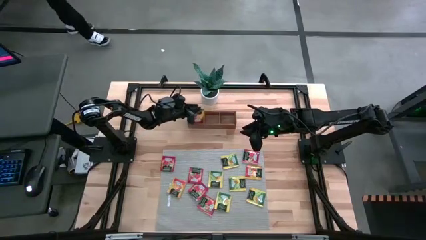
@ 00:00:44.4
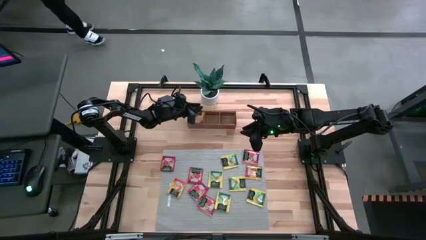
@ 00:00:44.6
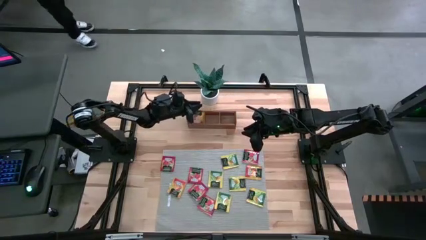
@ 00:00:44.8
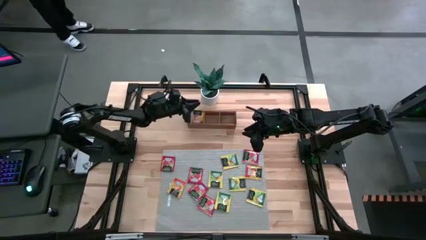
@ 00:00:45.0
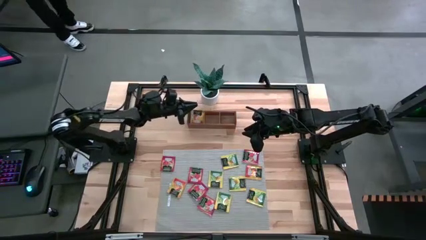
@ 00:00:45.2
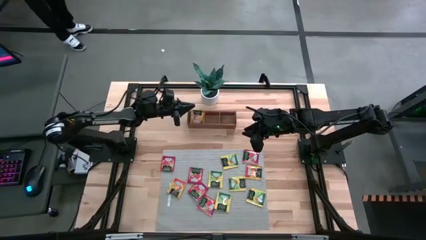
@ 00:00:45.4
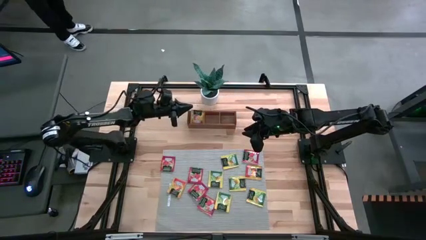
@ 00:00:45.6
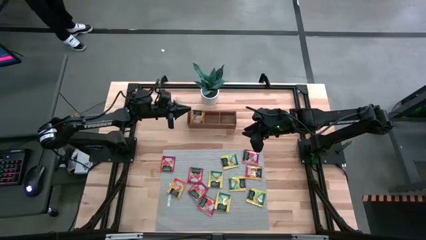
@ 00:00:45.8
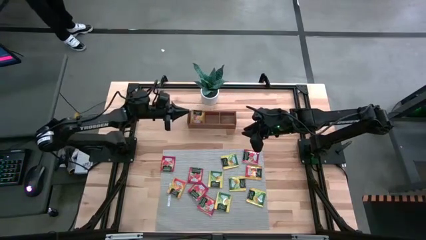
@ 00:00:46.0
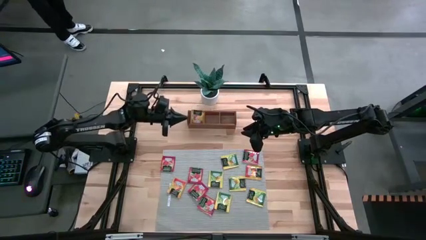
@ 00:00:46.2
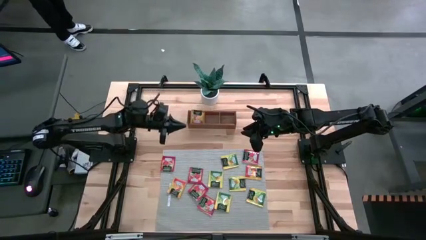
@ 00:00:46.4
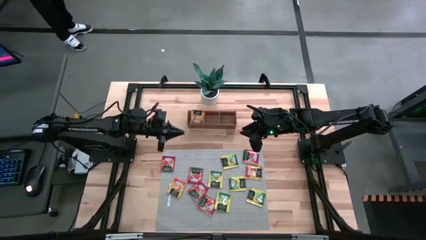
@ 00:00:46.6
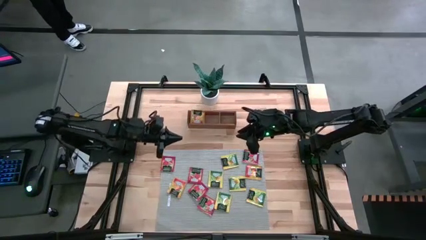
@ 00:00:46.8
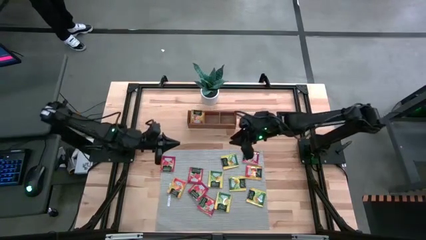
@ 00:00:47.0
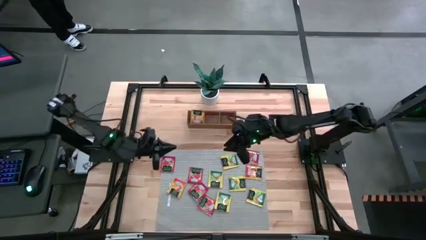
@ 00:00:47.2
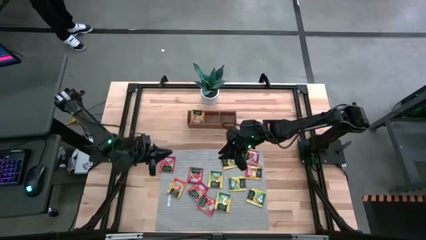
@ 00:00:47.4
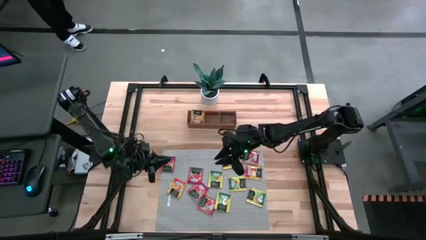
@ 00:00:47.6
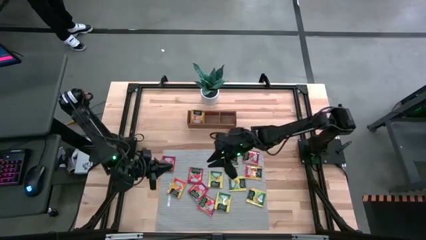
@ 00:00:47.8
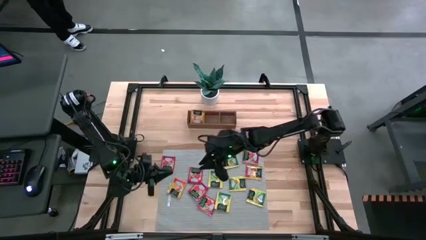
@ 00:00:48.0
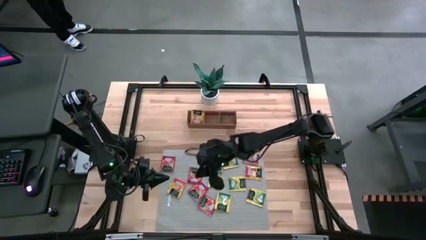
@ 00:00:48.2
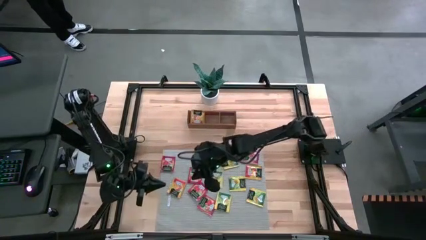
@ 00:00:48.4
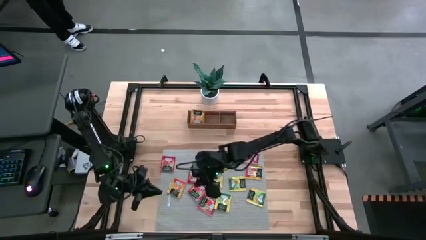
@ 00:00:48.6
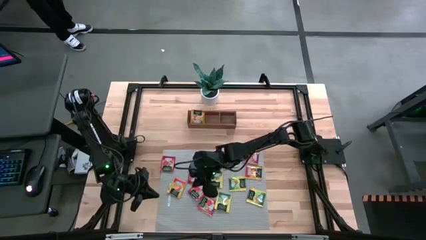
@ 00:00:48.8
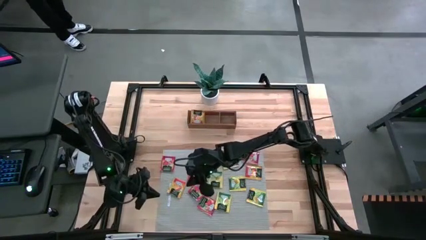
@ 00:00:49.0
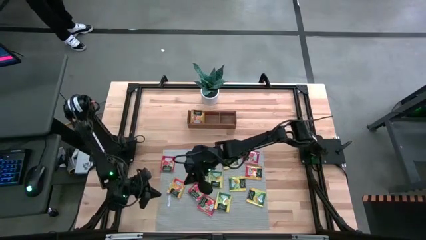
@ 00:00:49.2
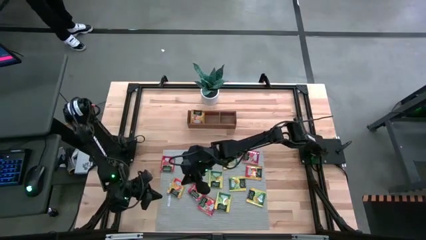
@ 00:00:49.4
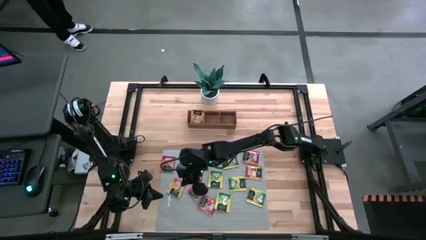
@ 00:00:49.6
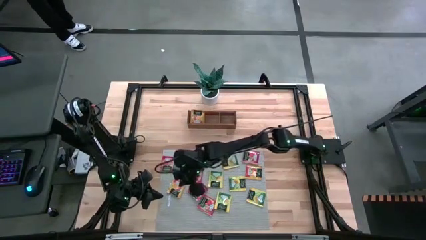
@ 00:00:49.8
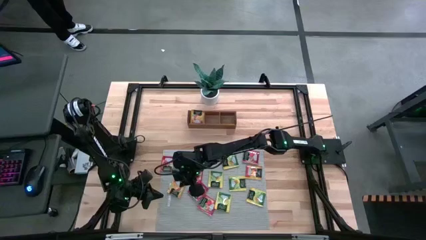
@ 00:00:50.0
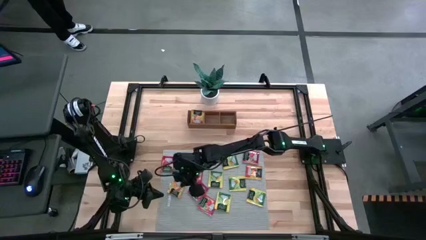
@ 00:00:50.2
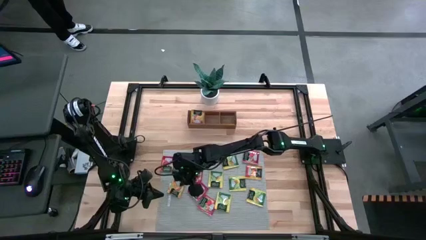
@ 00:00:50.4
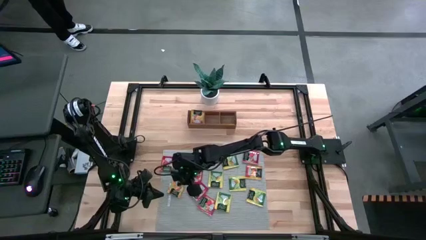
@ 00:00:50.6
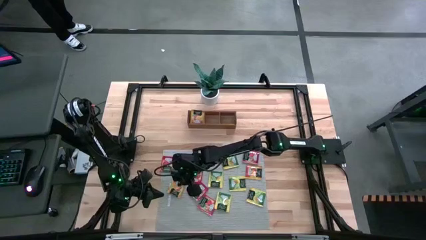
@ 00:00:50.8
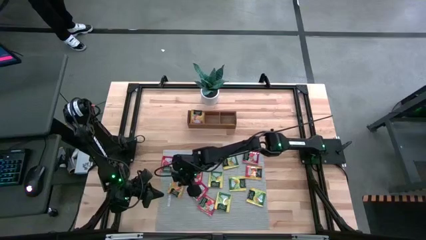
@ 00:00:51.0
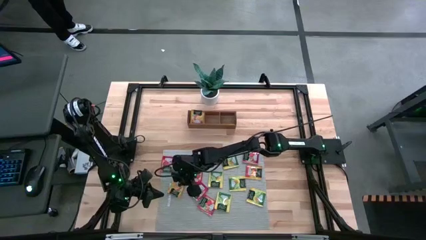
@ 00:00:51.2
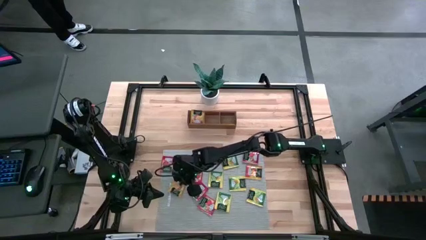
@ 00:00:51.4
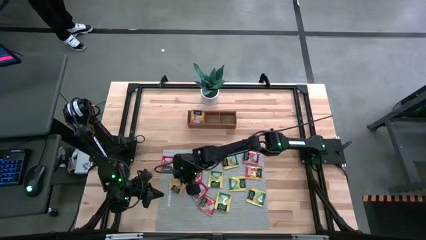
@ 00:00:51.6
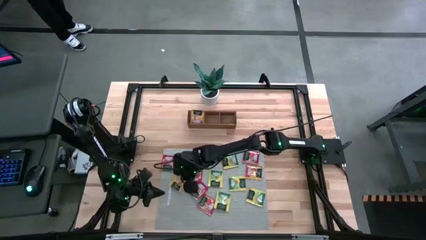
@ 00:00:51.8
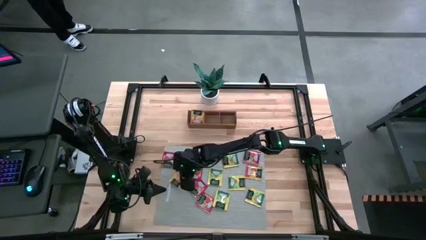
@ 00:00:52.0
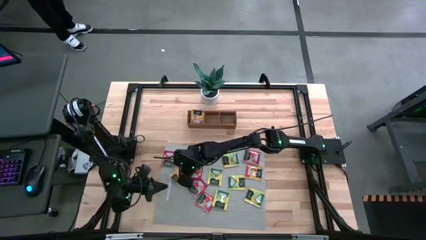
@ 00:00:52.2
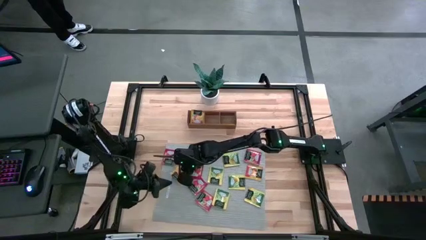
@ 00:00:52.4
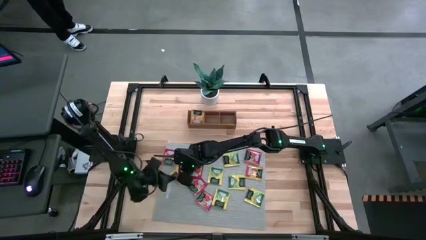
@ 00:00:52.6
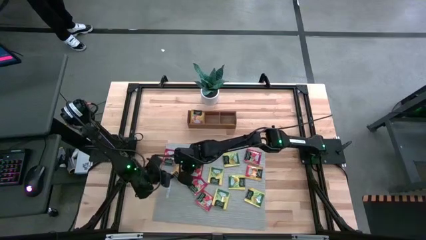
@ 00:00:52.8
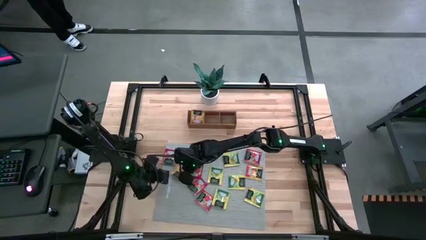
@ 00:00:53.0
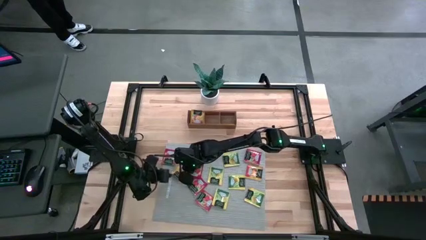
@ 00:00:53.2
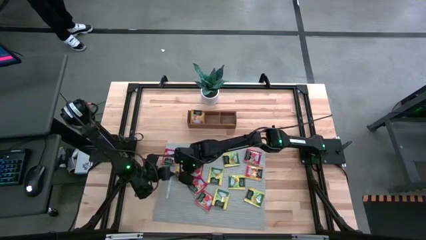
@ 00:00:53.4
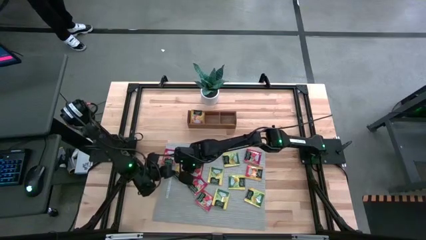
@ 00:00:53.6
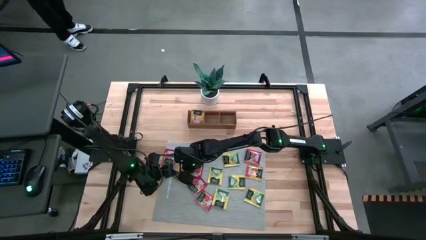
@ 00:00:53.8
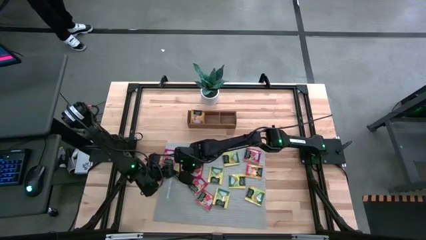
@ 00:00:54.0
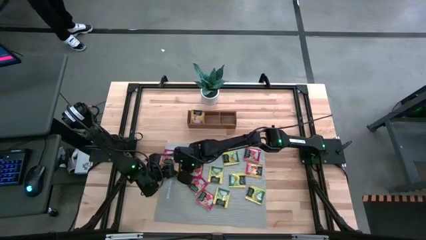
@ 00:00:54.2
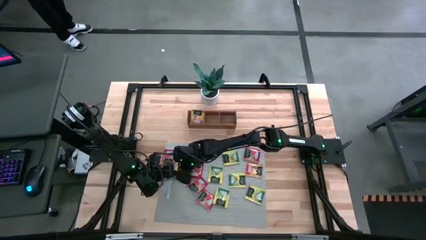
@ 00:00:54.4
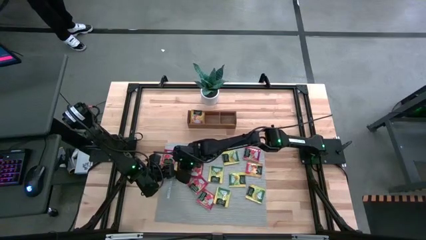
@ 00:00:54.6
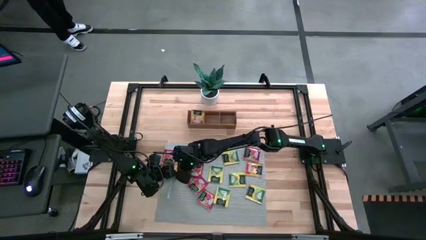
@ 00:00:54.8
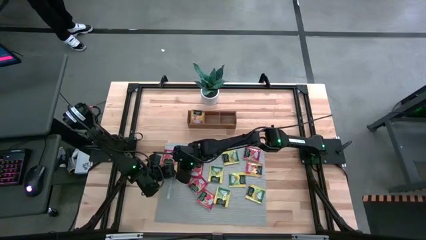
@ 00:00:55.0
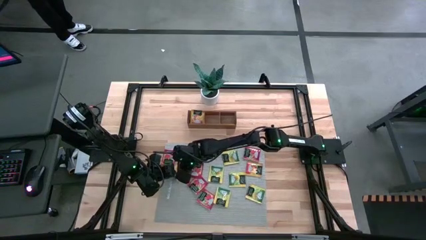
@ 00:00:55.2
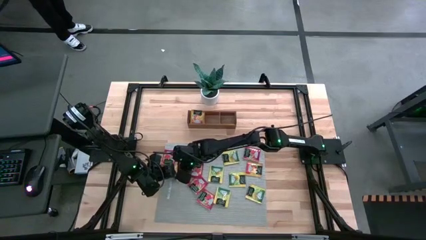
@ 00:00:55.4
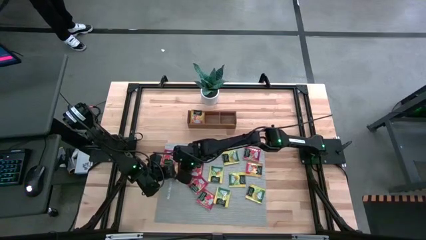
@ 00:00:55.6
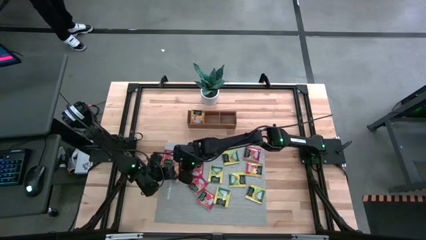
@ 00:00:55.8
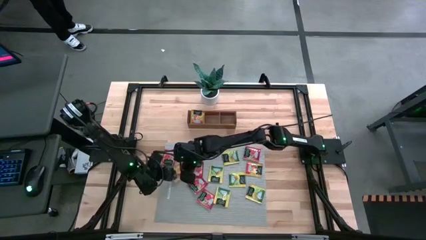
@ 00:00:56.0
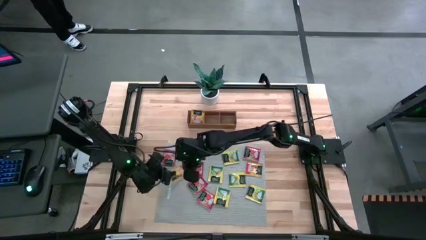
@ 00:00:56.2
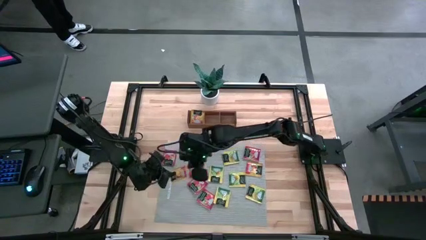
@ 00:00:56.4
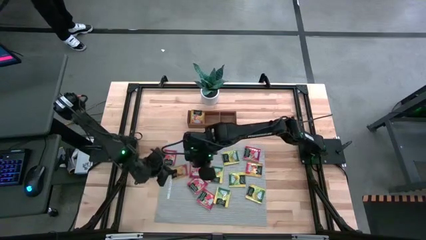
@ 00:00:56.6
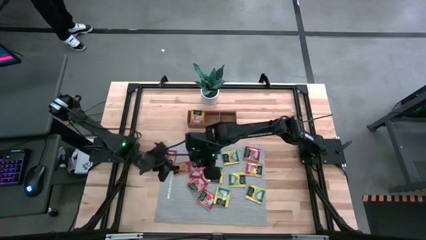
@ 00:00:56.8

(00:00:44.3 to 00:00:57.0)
Task: Pick & Place Tea
Put the orange tea bag into the left section of the wooden organizer
